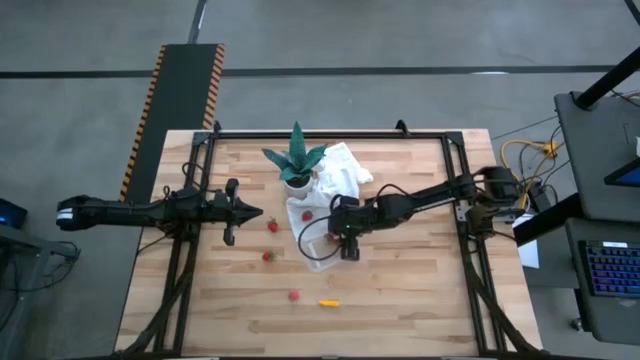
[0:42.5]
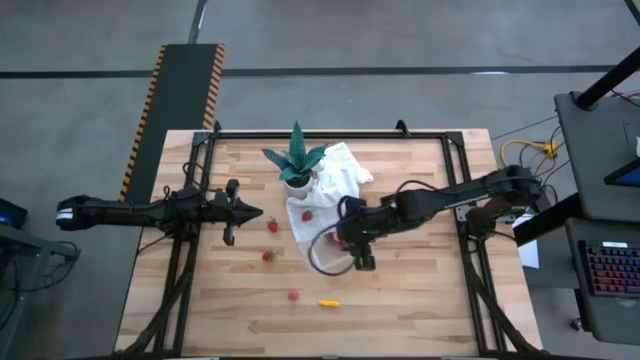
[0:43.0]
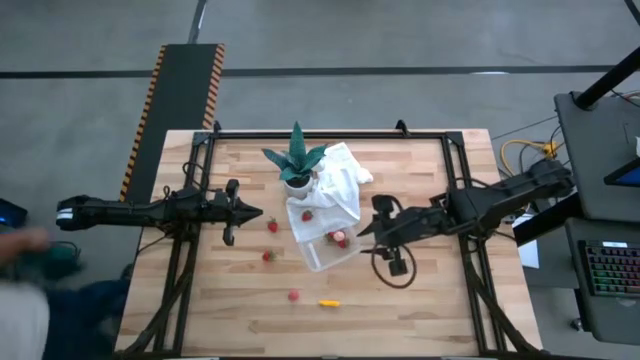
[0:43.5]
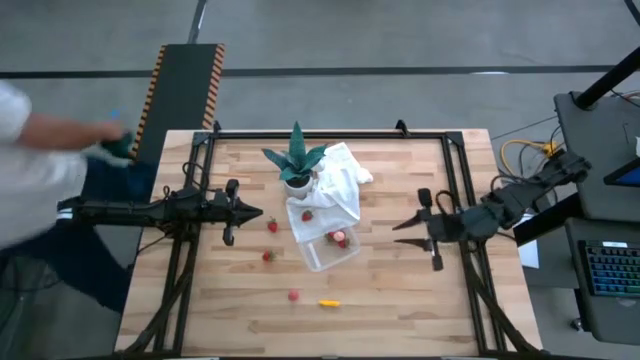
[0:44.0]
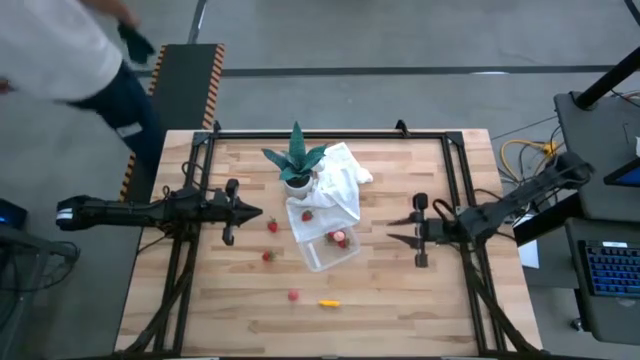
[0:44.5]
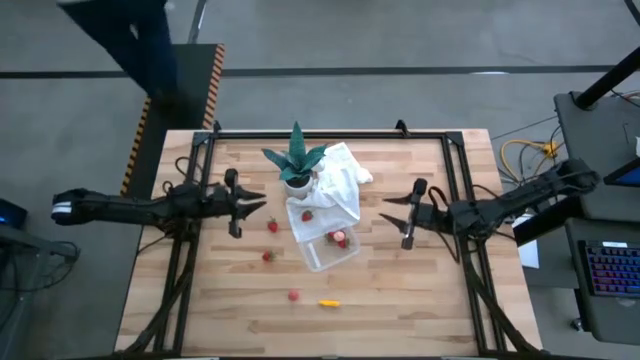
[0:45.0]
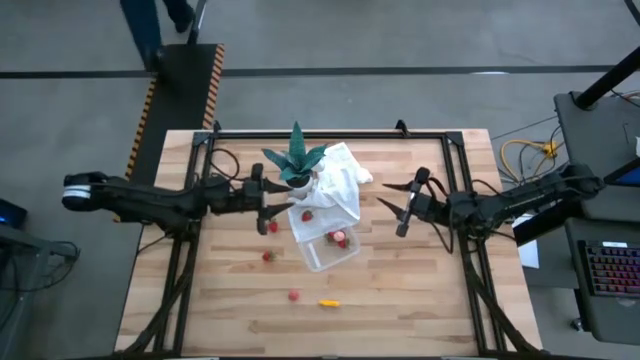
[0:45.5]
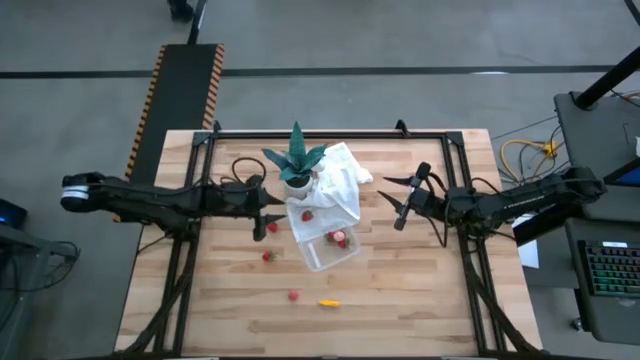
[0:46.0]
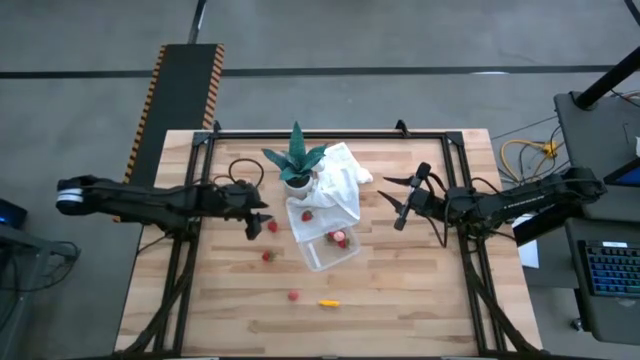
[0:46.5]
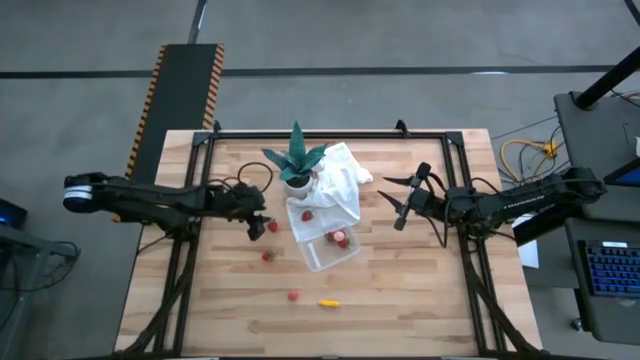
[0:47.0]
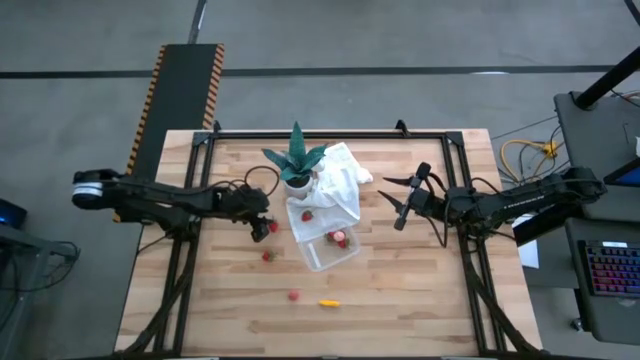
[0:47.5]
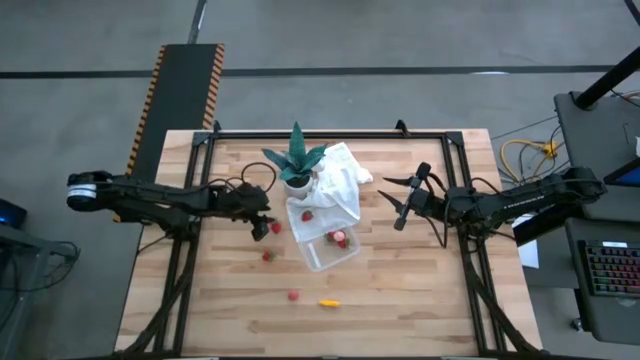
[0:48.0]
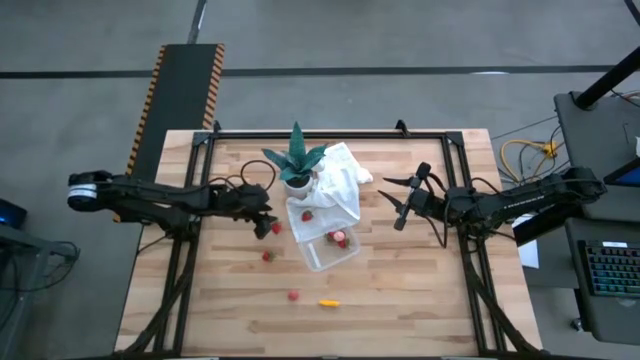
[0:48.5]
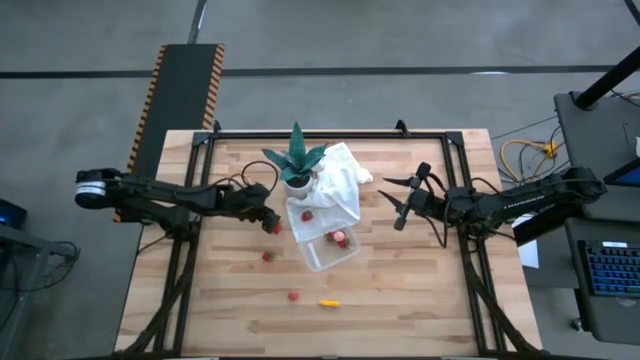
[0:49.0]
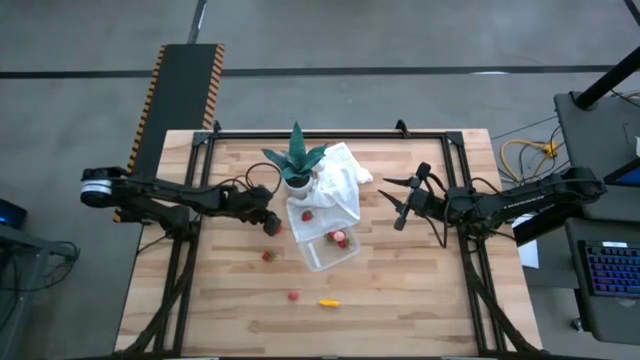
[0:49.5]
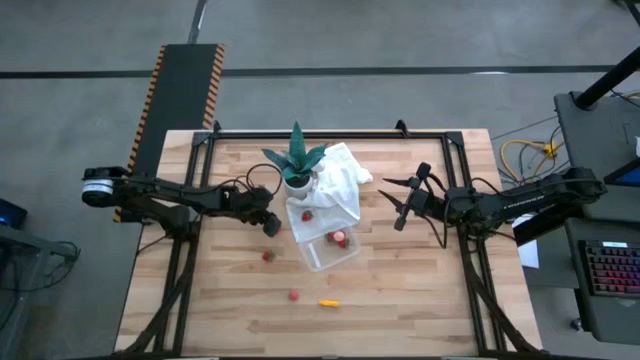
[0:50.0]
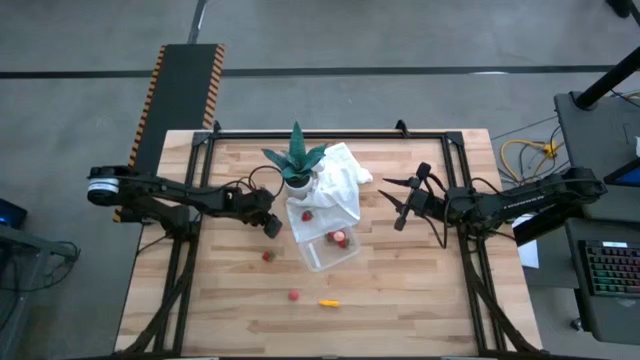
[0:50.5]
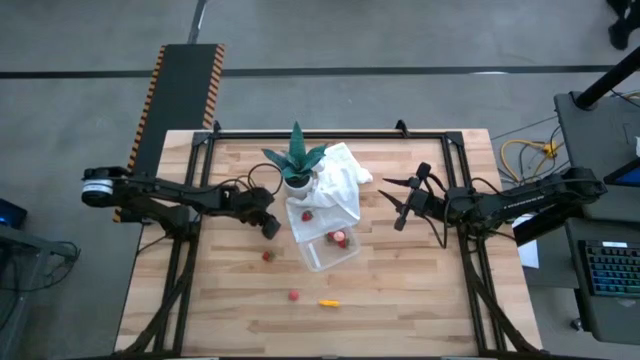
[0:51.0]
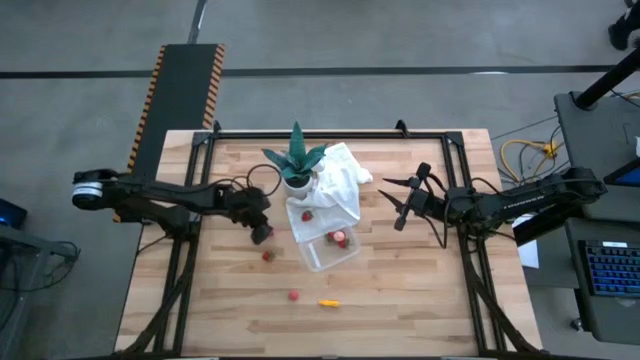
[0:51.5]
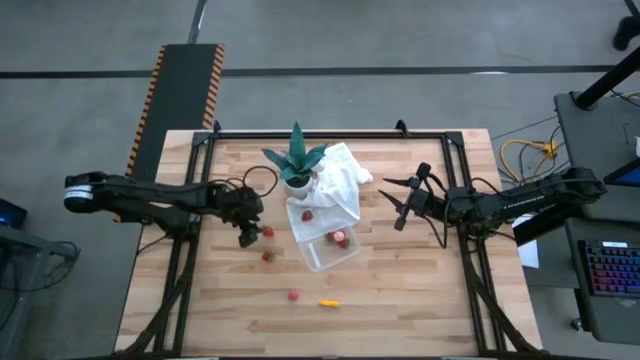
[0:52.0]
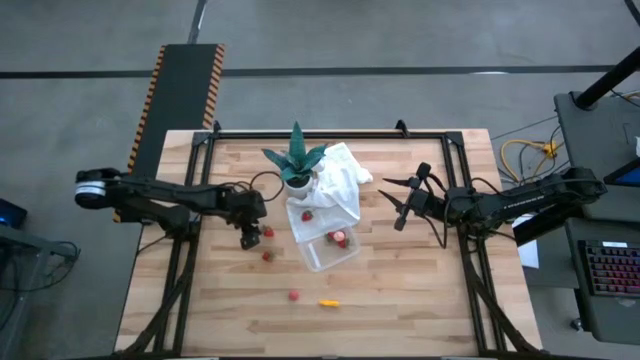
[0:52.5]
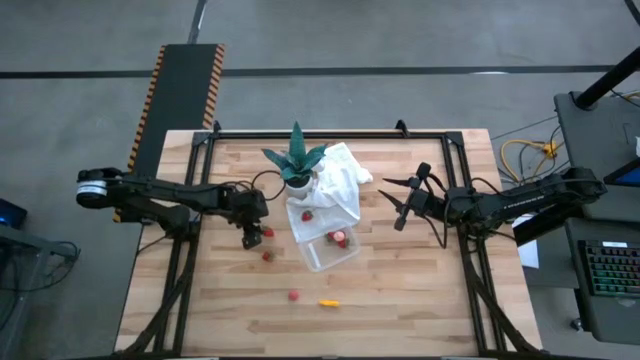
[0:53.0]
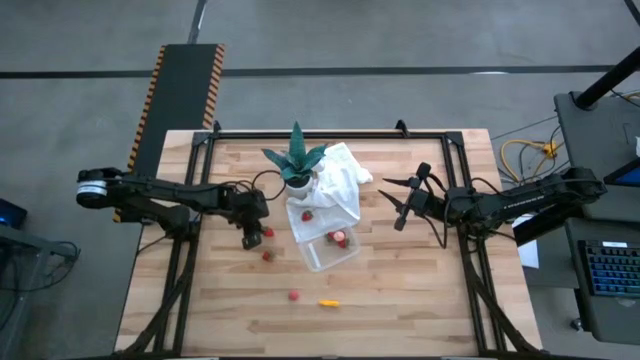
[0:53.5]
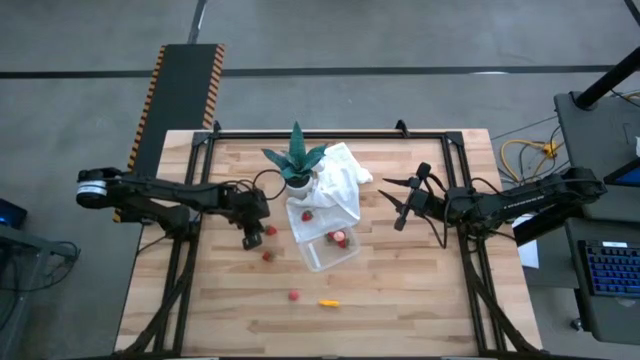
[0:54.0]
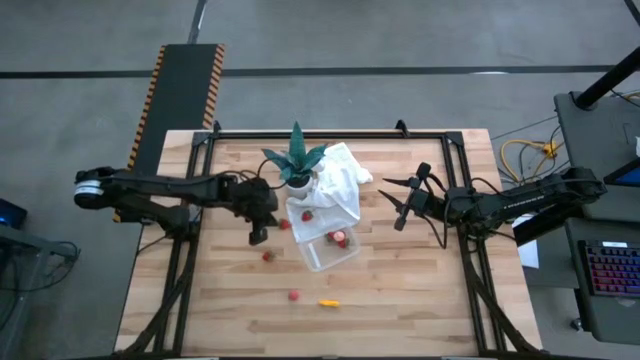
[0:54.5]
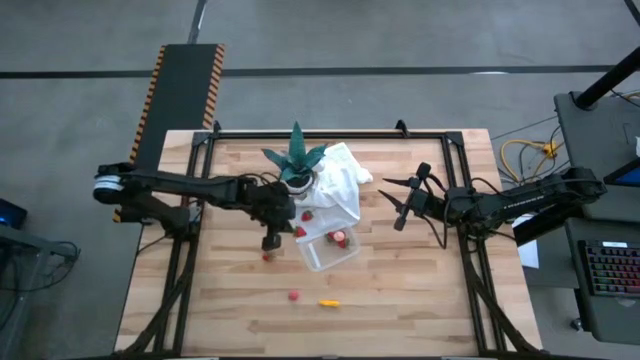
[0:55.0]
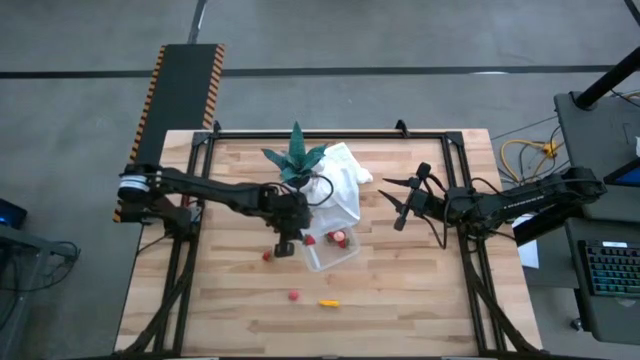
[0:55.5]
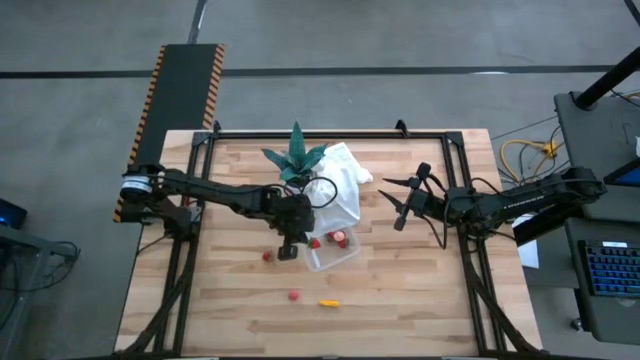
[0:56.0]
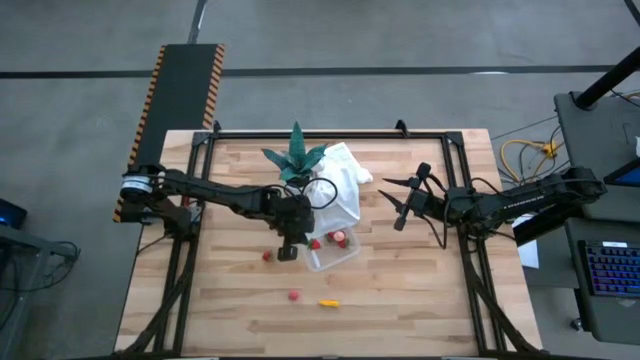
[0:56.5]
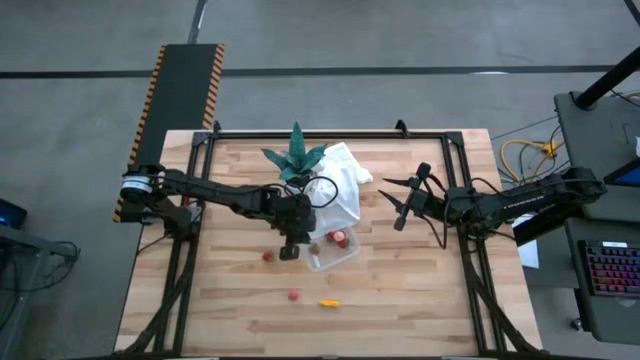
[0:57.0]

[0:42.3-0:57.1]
Task: Pick and placing Produce into tupperware
Put the strawberry into the transparent bin

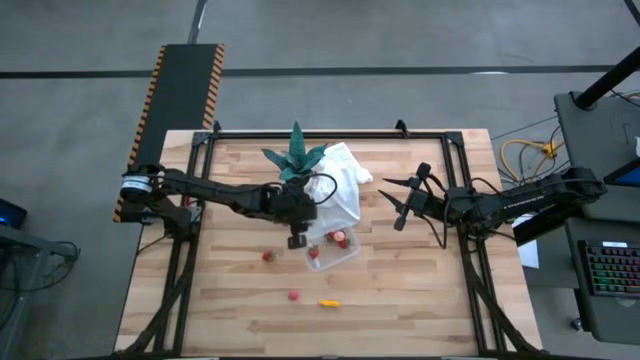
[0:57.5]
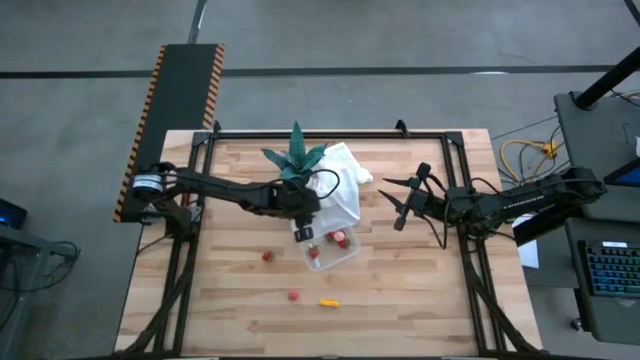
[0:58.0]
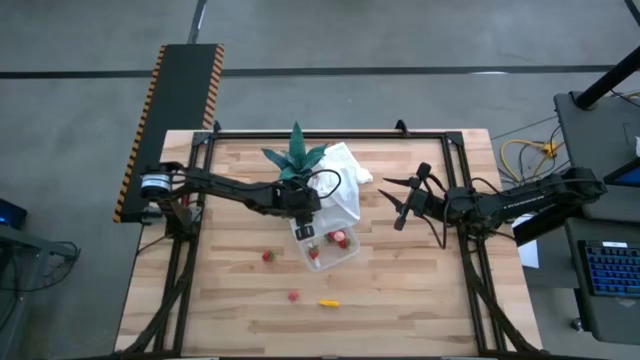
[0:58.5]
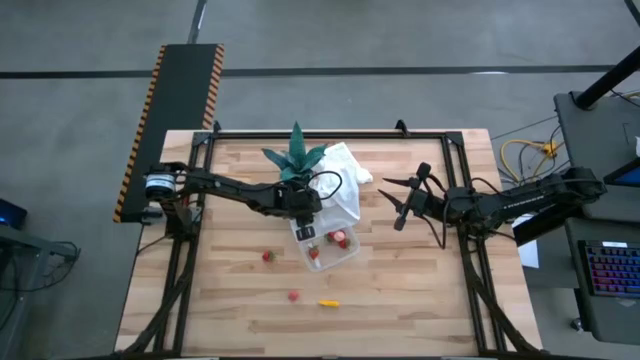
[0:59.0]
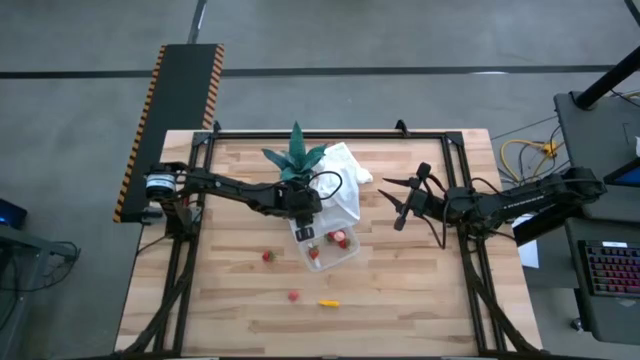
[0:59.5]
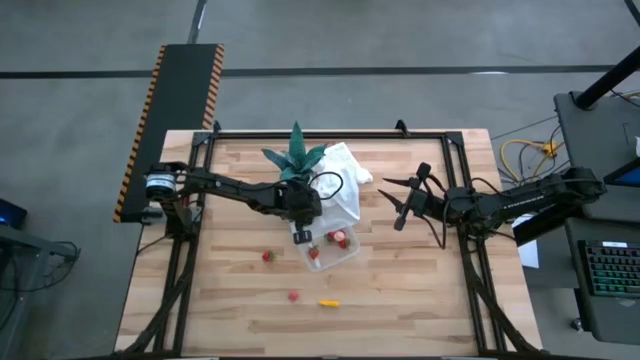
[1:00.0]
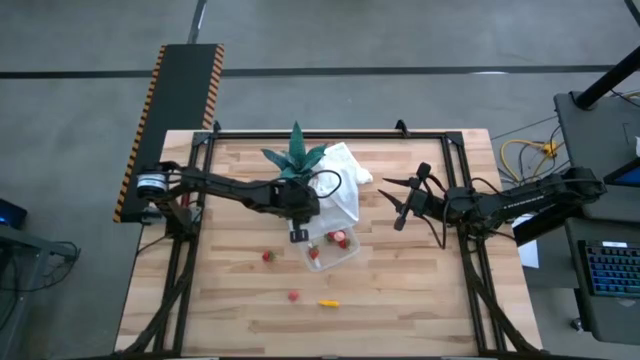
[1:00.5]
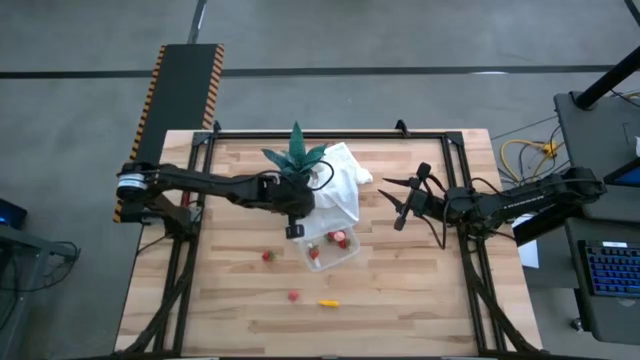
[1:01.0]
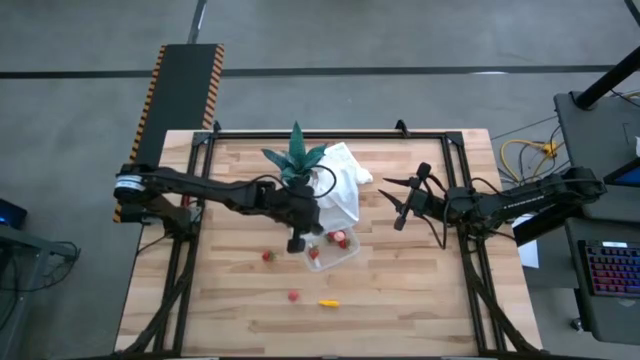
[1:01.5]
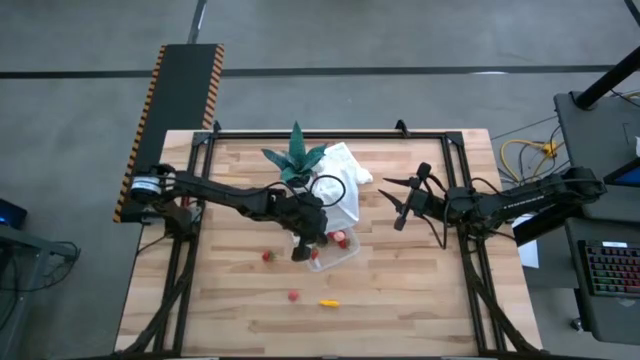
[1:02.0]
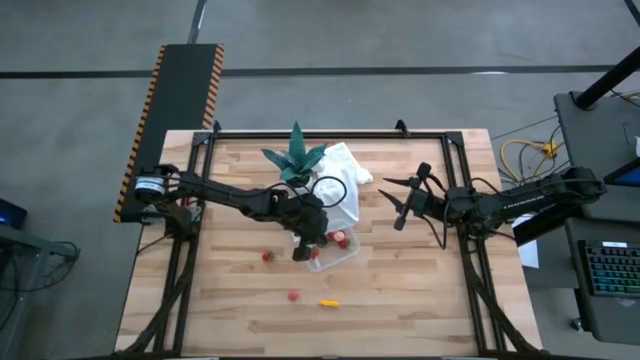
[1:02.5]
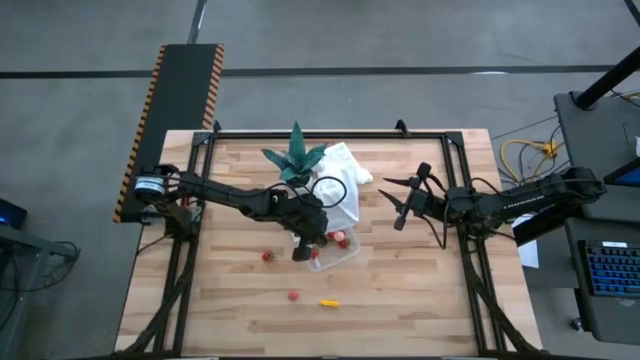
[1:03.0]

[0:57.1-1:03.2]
Put the strawberry into the transparent bin
